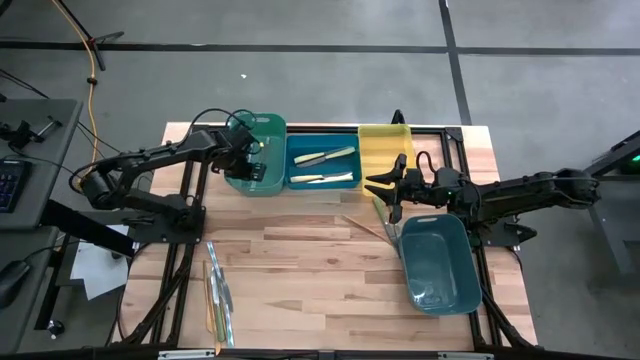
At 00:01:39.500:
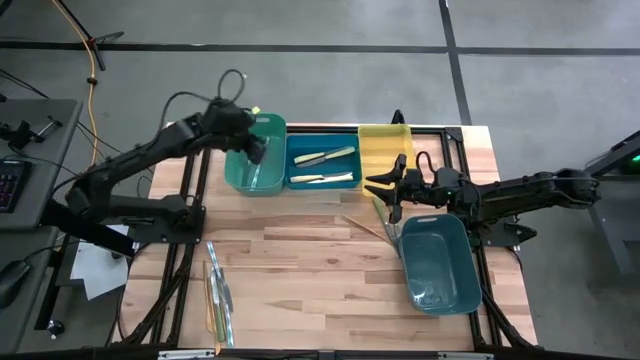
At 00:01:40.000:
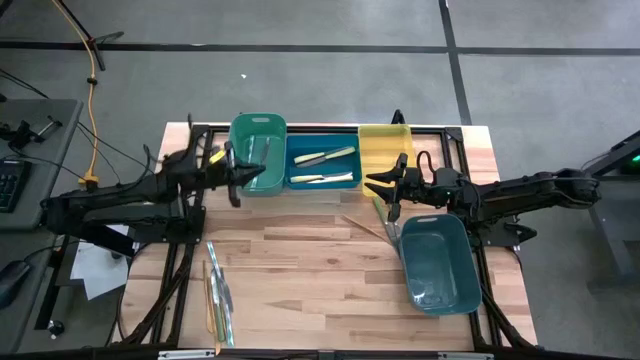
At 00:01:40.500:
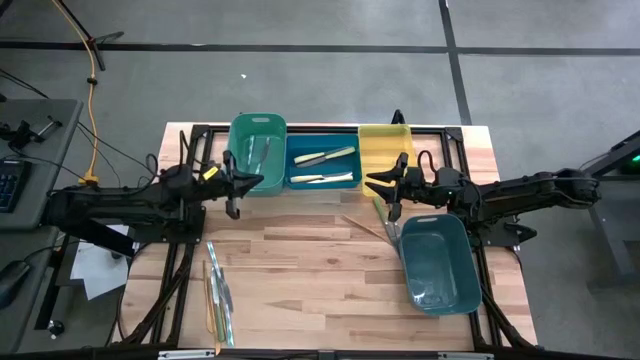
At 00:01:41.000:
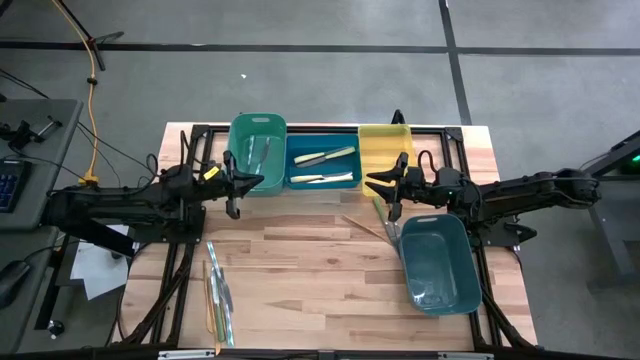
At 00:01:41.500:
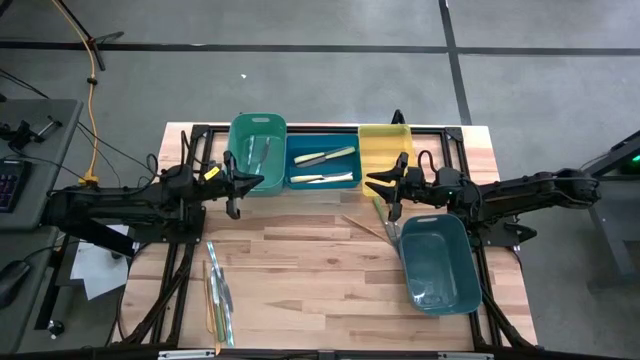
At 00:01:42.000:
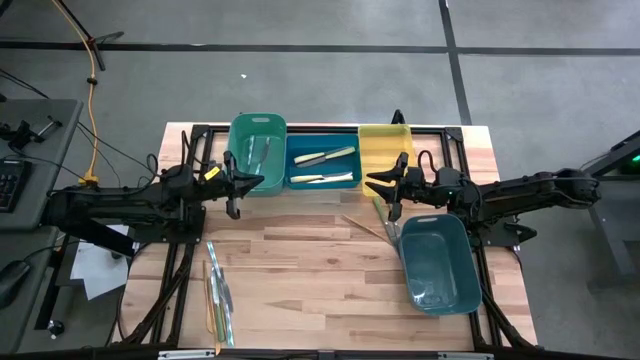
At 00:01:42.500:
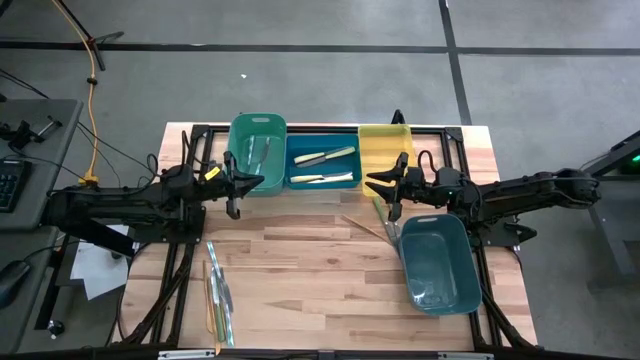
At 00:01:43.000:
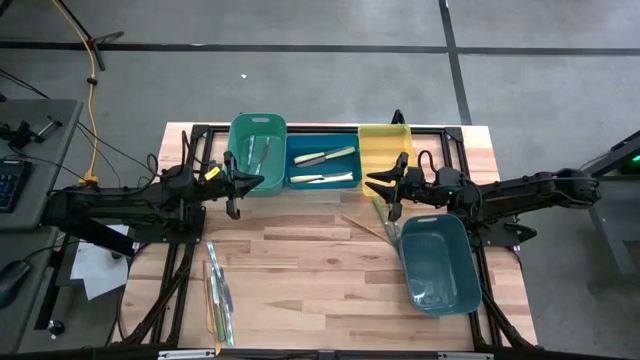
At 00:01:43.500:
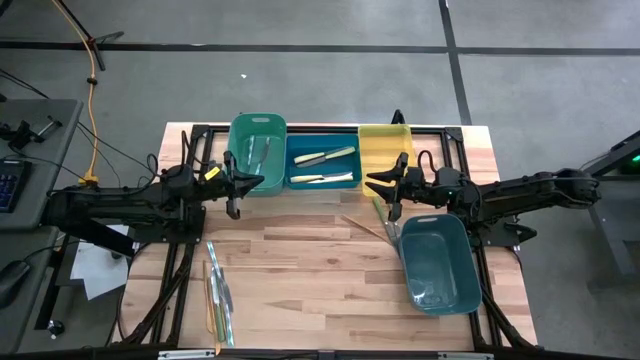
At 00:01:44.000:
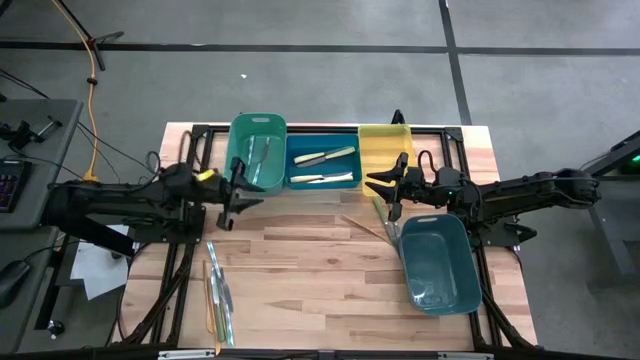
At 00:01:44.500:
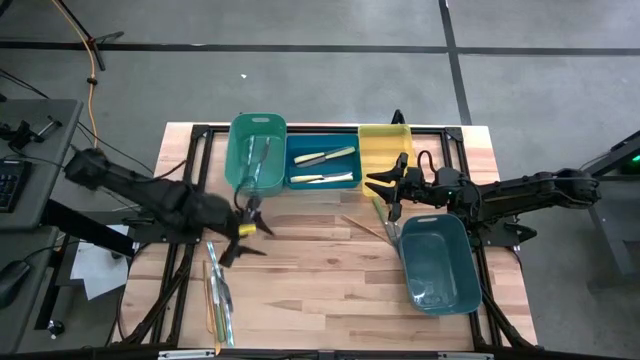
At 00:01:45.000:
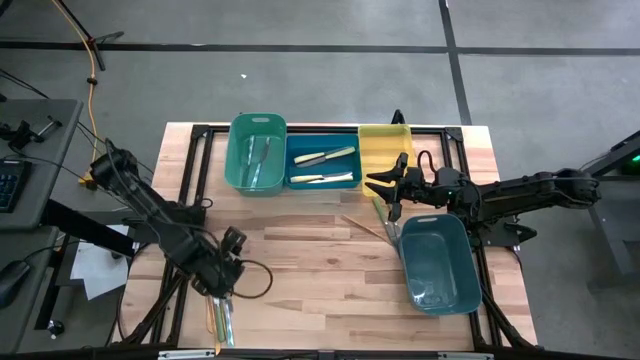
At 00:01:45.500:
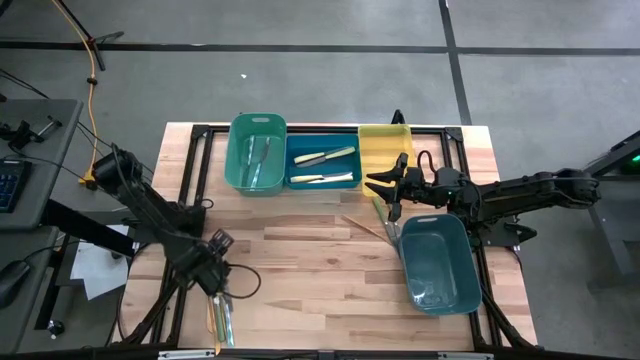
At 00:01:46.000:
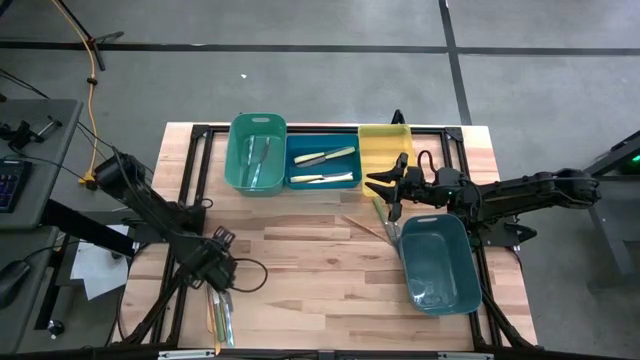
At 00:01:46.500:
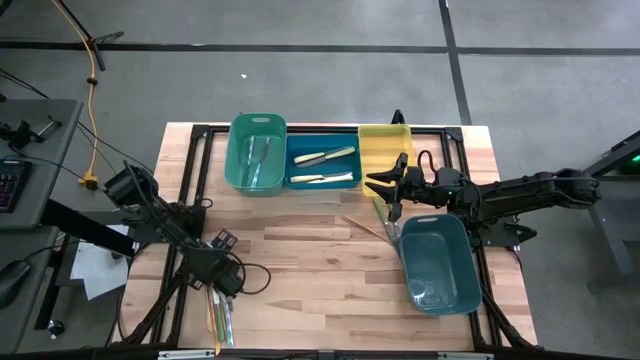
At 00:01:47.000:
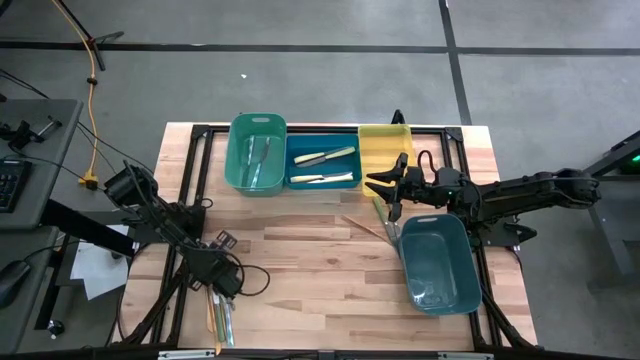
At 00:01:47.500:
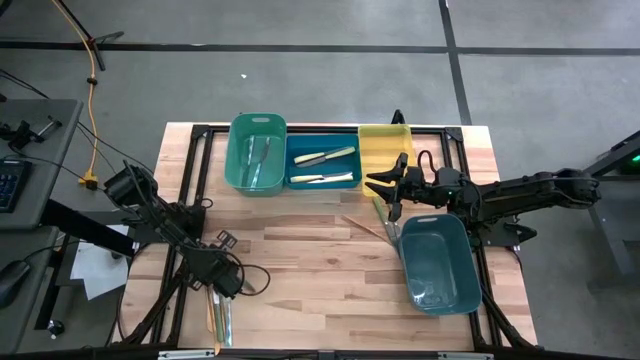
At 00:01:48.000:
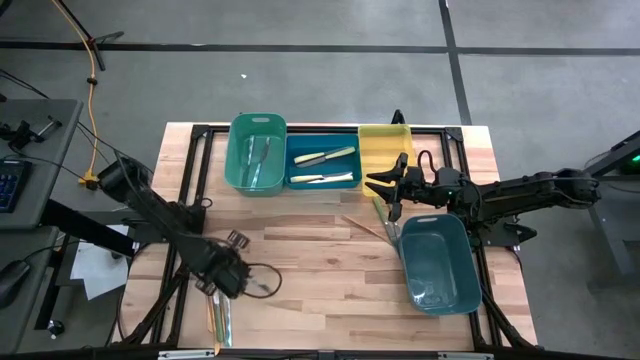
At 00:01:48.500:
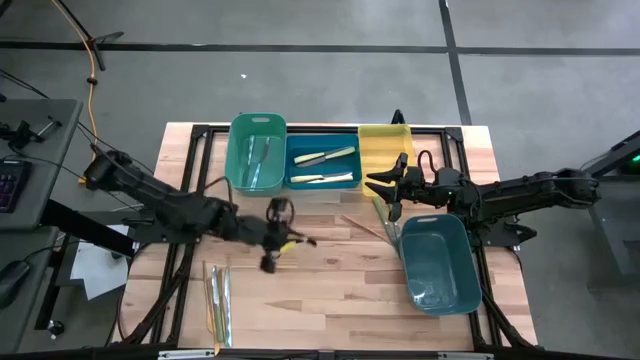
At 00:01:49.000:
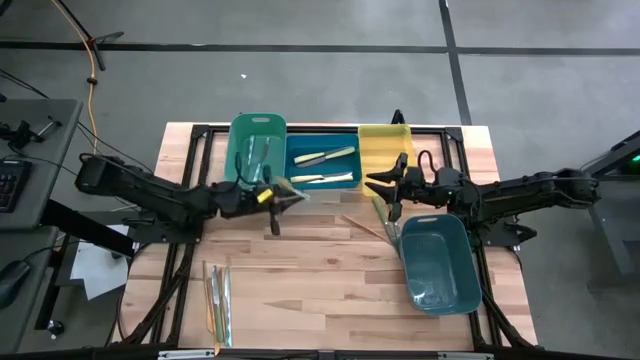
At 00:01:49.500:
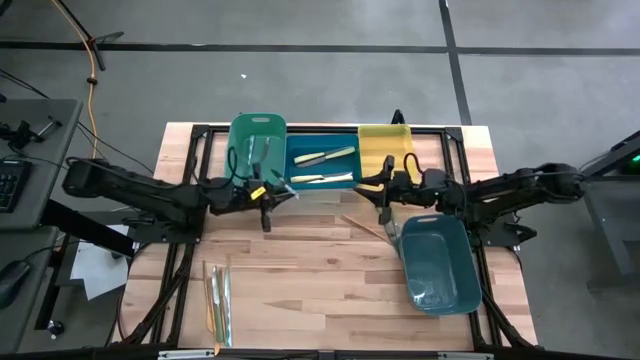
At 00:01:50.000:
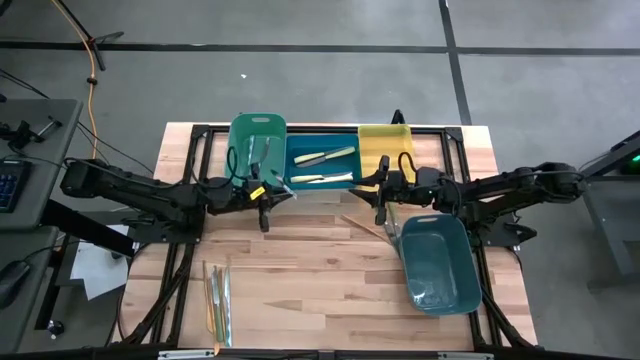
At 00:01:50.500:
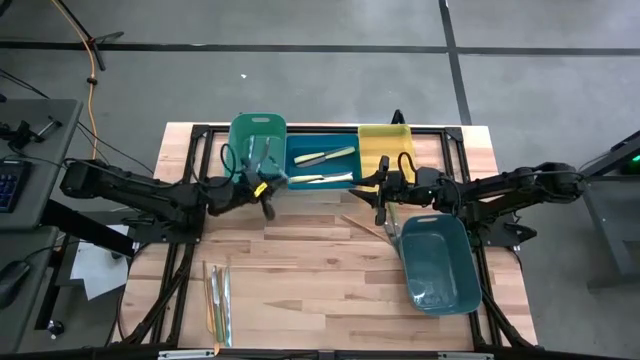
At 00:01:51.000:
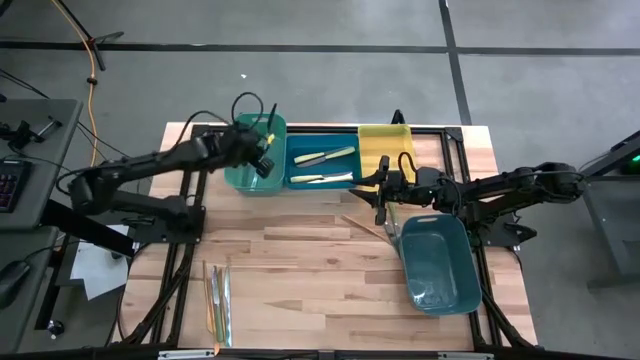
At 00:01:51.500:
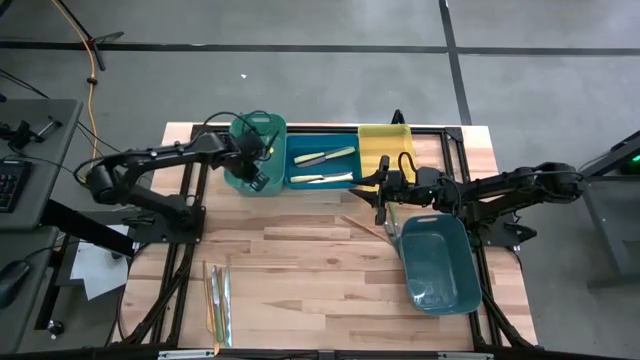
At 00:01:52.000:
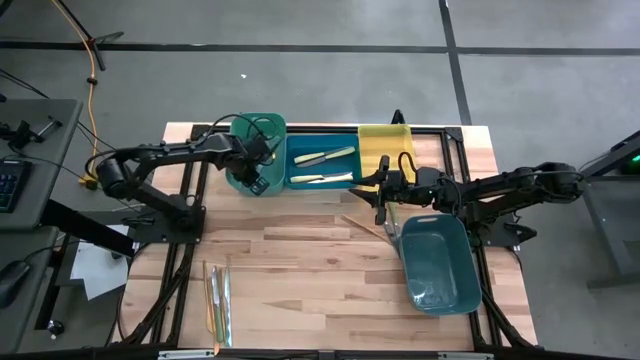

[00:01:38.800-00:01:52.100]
Task: Sort silverware by color (type)
Put the blue knife into the green bin

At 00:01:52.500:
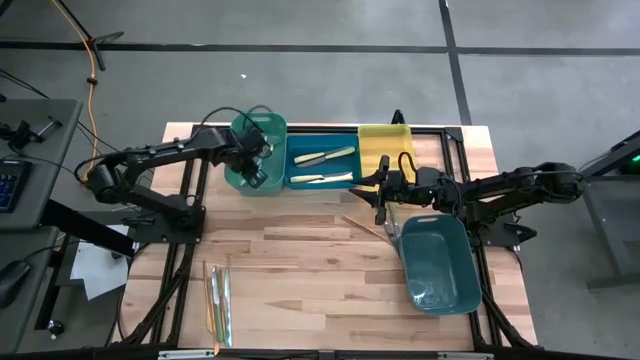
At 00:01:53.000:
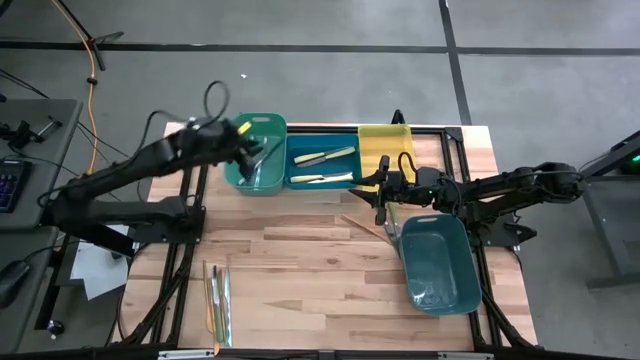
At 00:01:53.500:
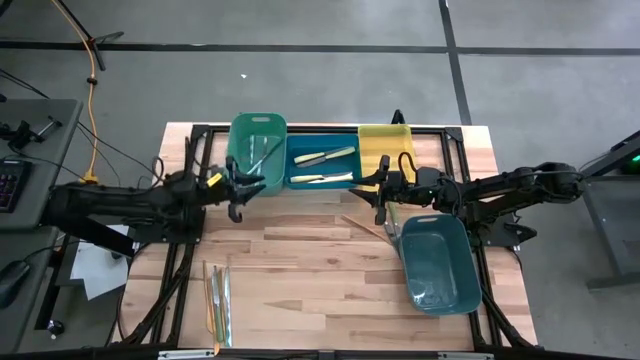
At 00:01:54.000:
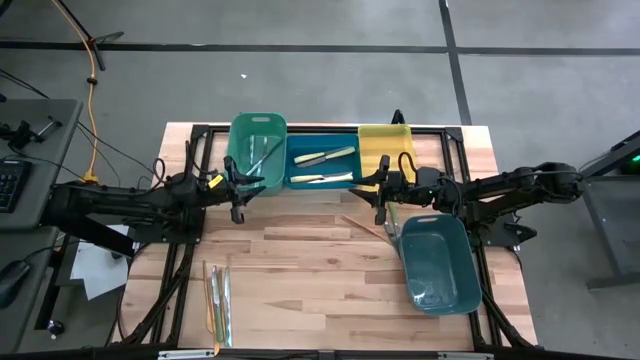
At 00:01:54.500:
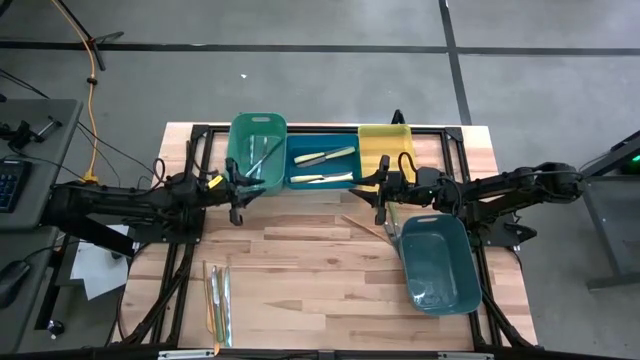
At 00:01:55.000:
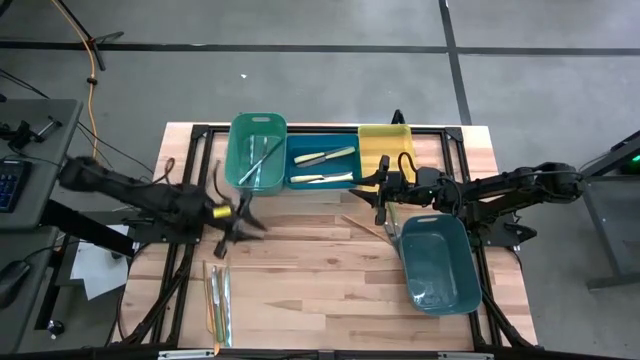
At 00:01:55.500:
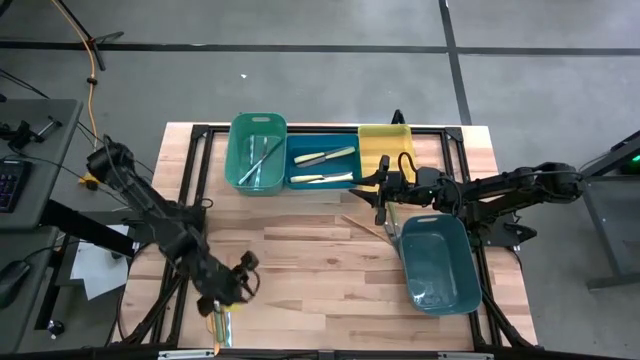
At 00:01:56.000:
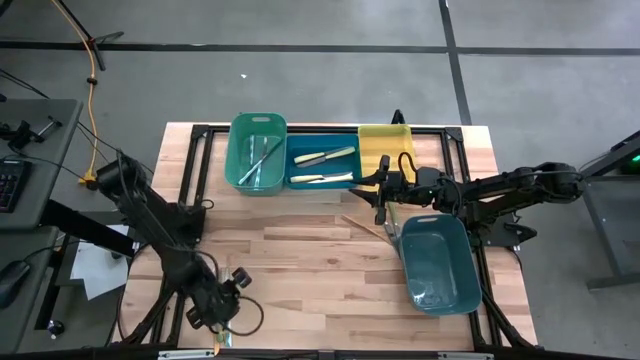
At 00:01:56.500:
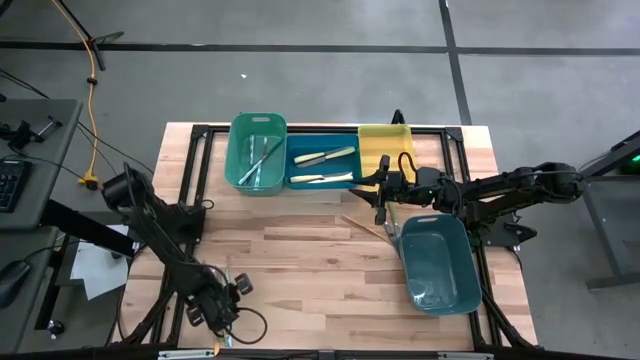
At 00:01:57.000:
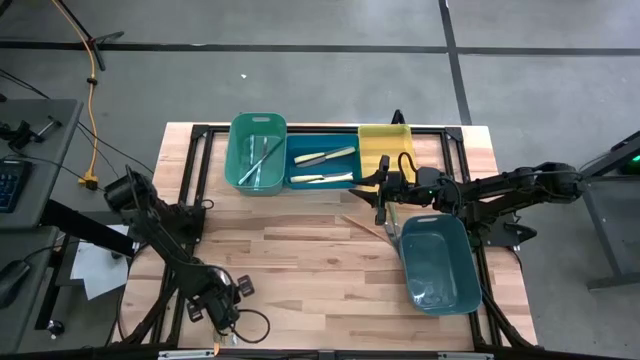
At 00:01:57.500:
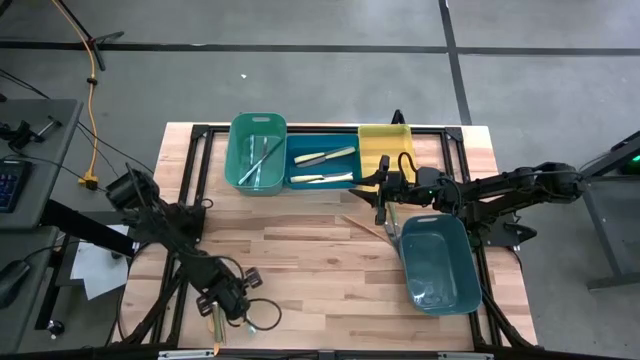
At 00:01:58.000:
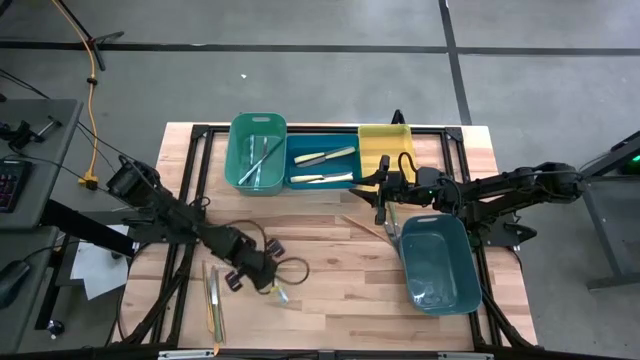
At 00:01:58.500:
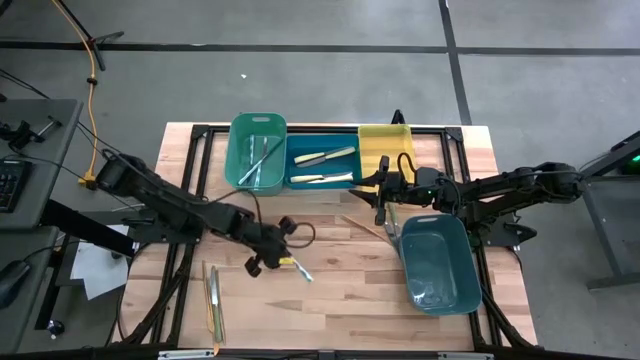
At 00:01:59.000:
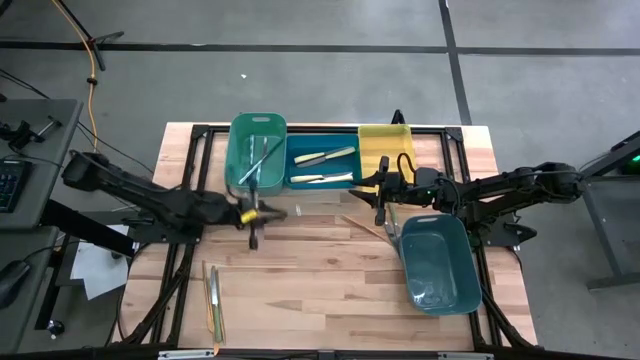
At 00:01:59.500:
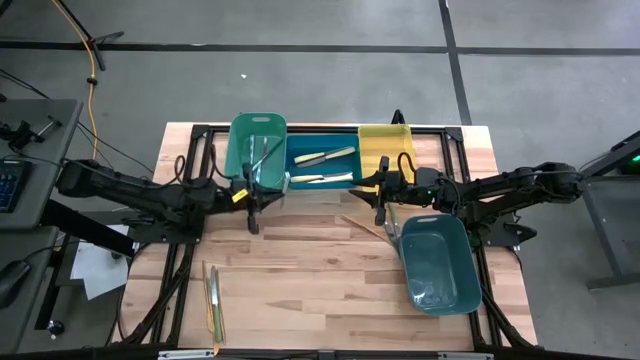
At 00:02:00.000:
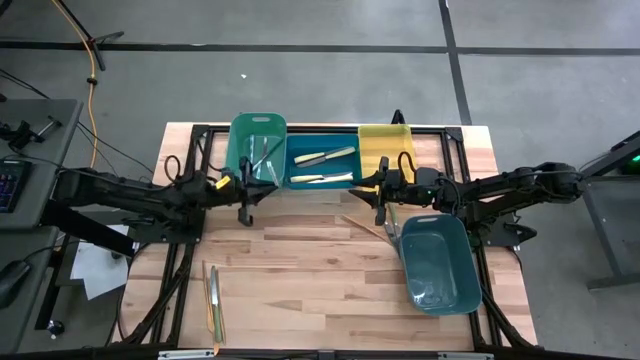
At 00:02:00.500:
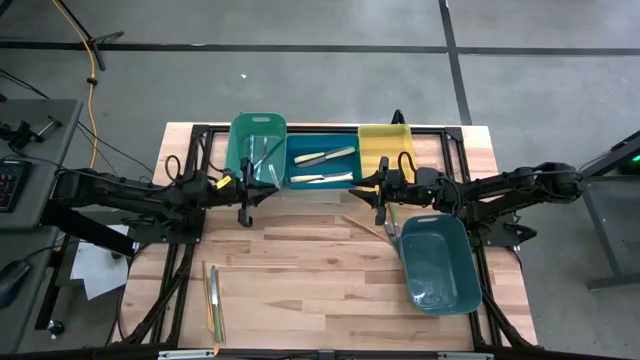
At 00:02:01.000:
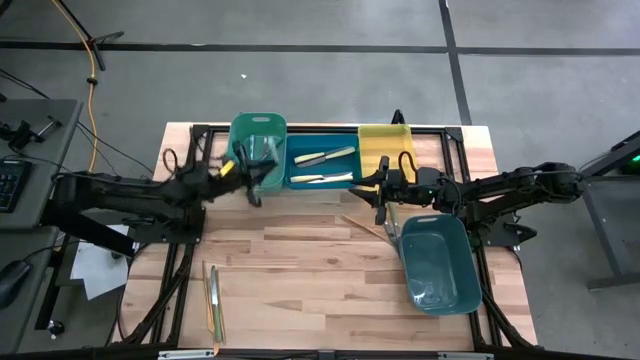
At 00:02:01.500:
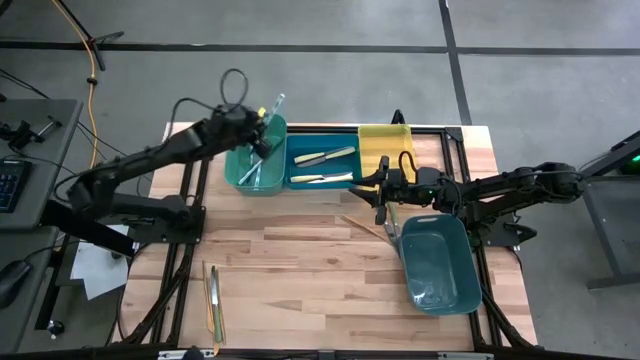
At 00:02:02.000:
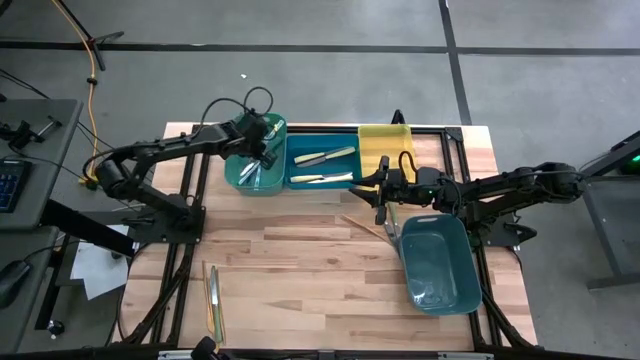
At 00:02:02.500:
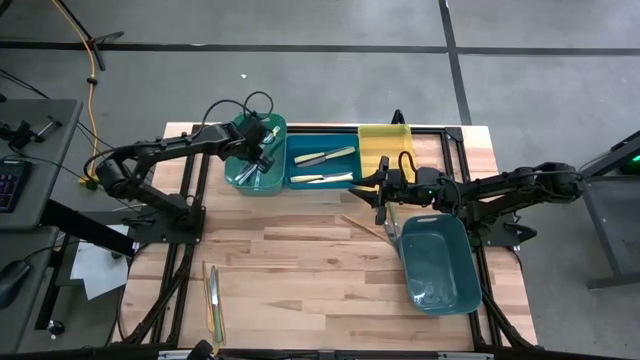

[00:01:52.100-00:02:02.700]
Put the blue knife into the green bin
